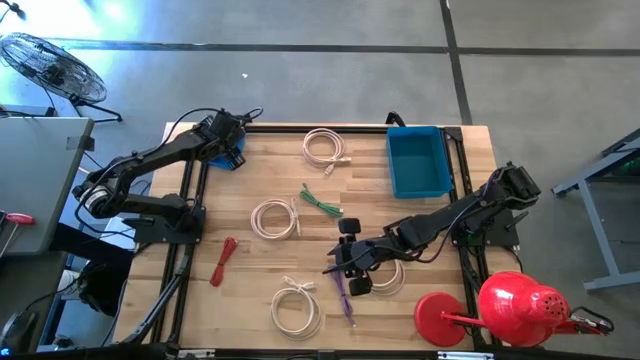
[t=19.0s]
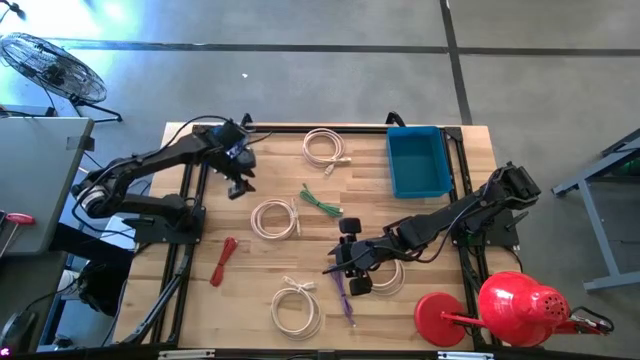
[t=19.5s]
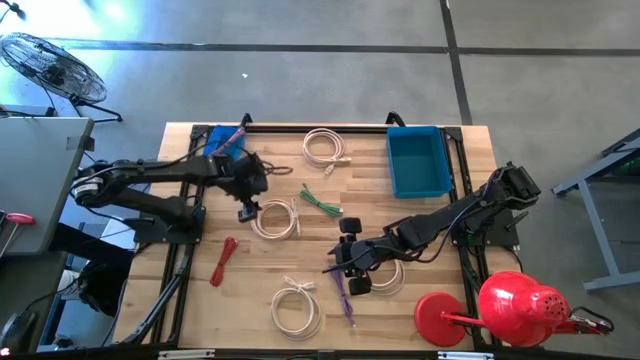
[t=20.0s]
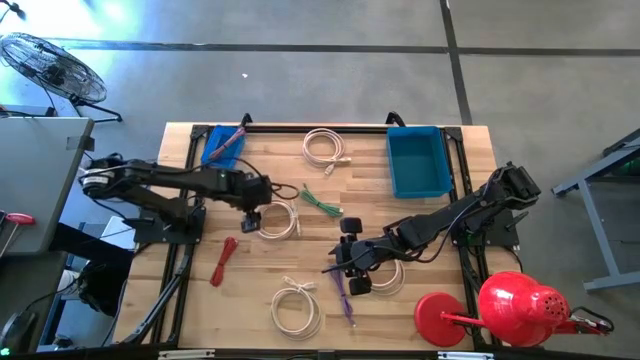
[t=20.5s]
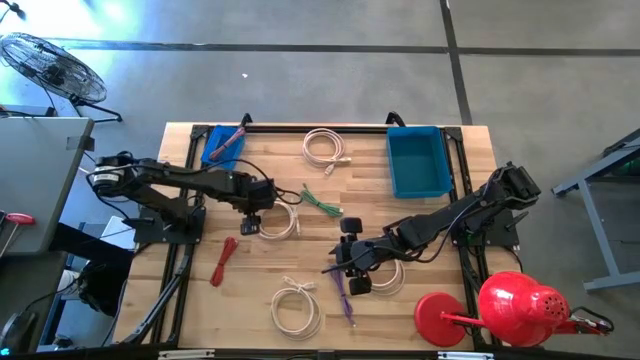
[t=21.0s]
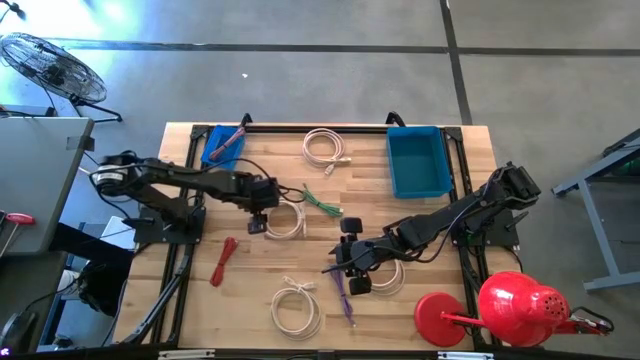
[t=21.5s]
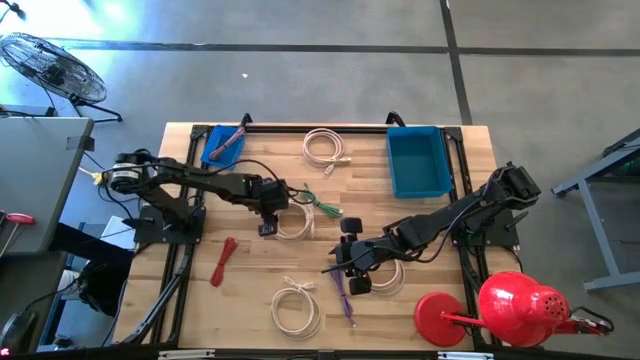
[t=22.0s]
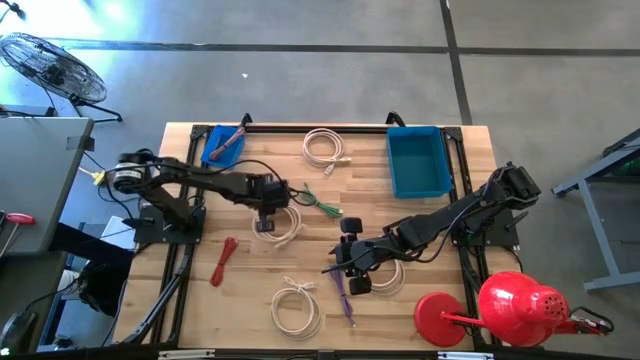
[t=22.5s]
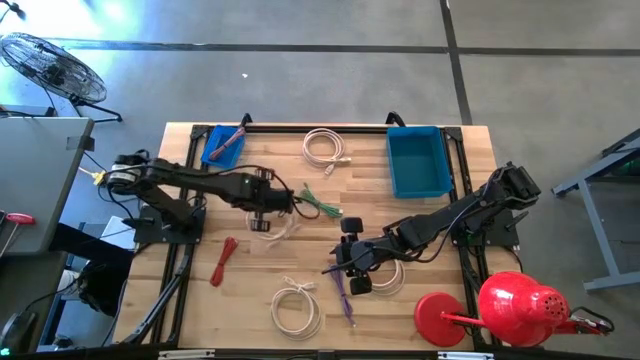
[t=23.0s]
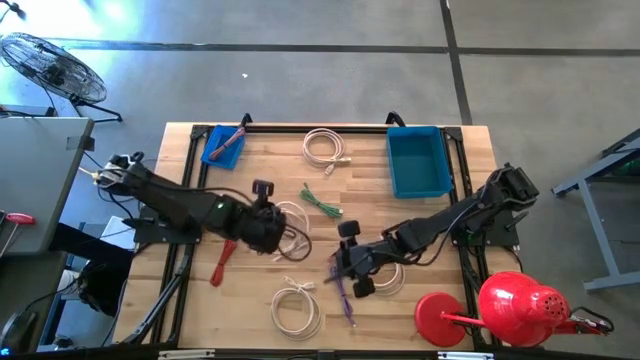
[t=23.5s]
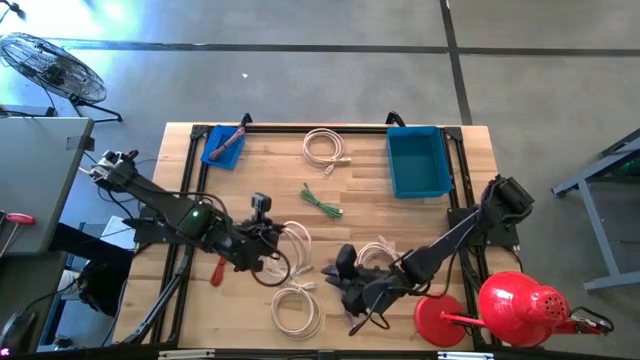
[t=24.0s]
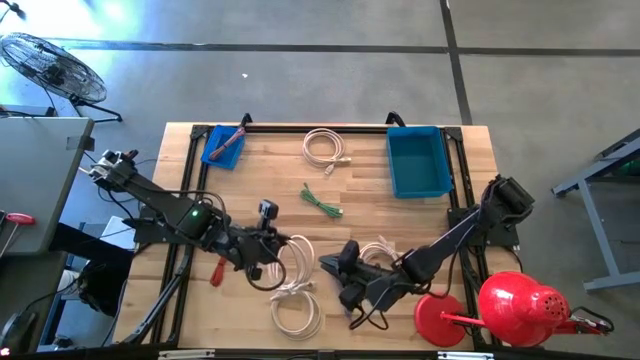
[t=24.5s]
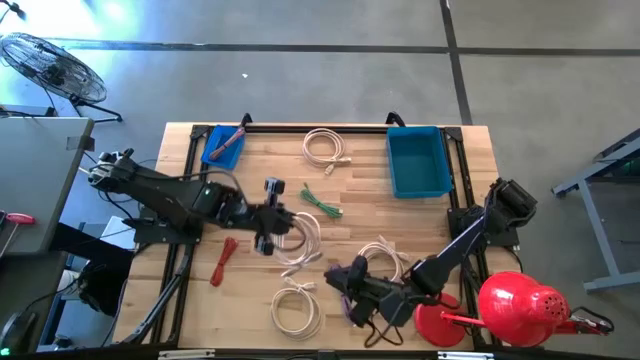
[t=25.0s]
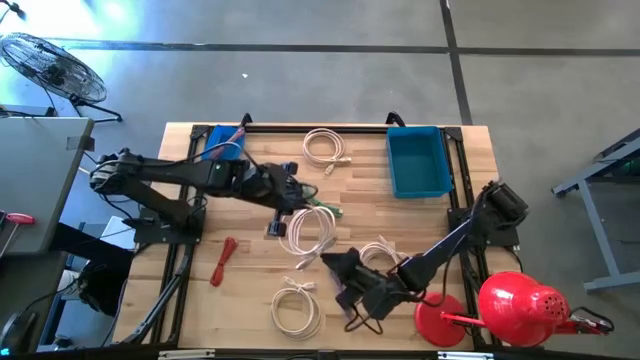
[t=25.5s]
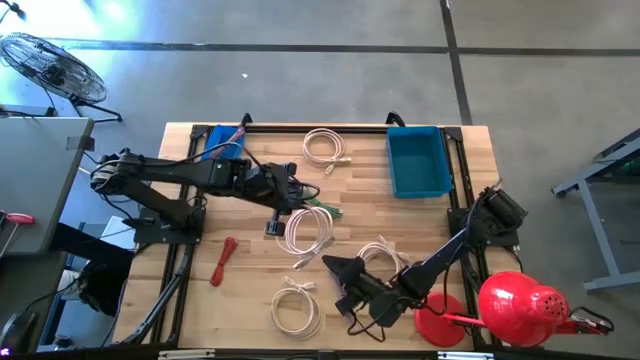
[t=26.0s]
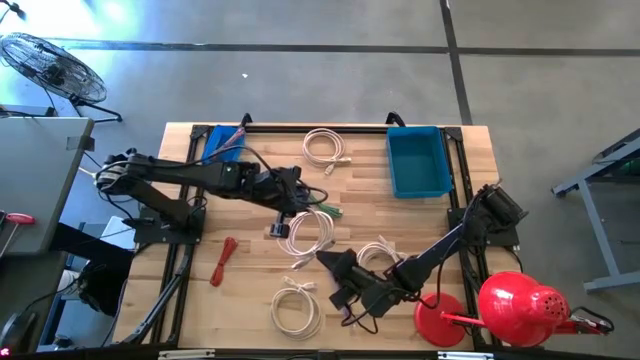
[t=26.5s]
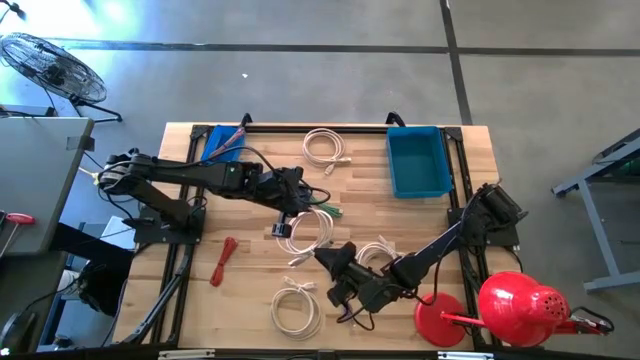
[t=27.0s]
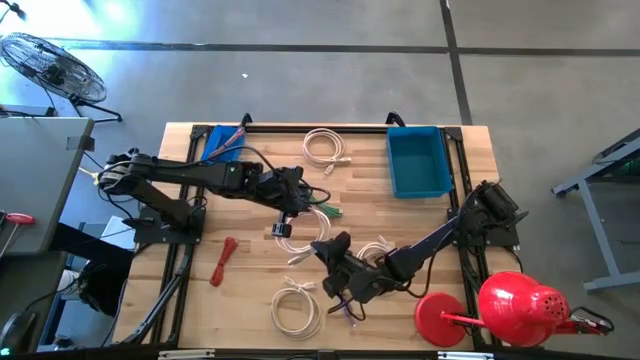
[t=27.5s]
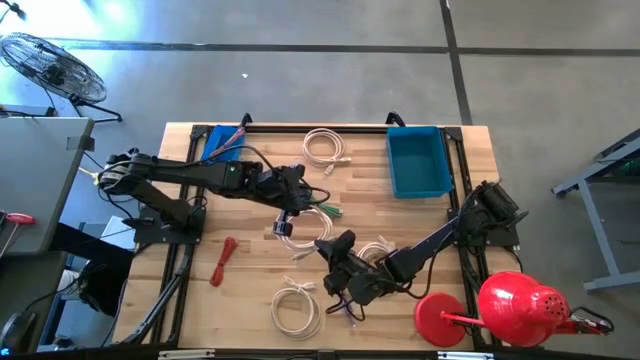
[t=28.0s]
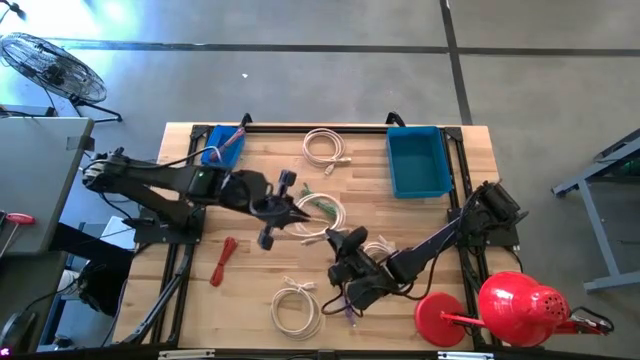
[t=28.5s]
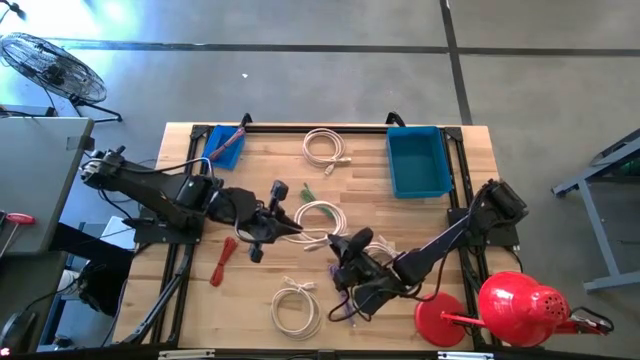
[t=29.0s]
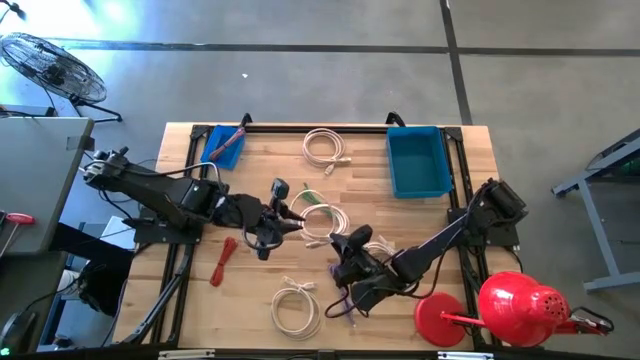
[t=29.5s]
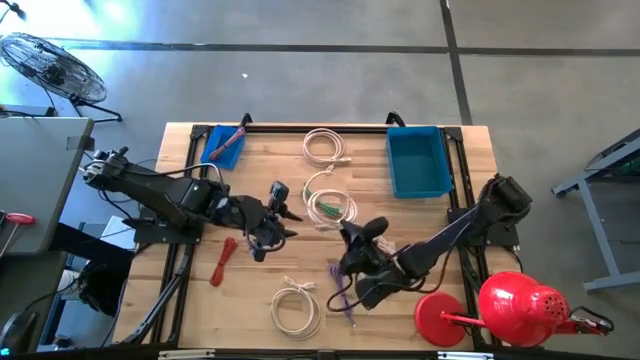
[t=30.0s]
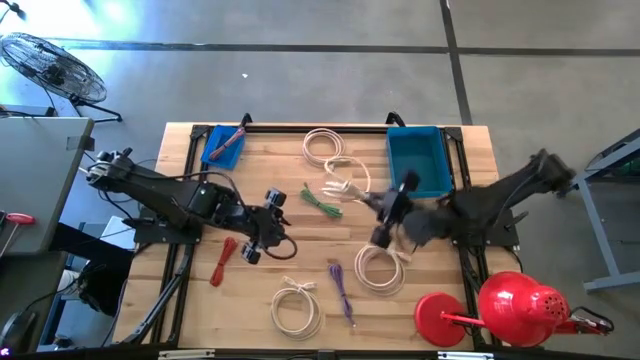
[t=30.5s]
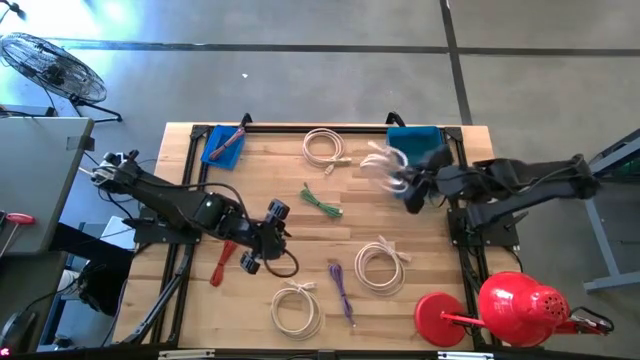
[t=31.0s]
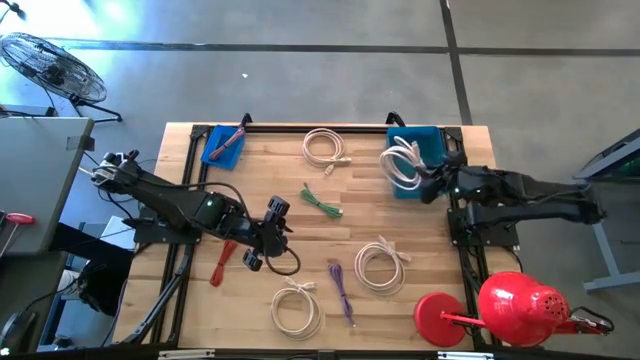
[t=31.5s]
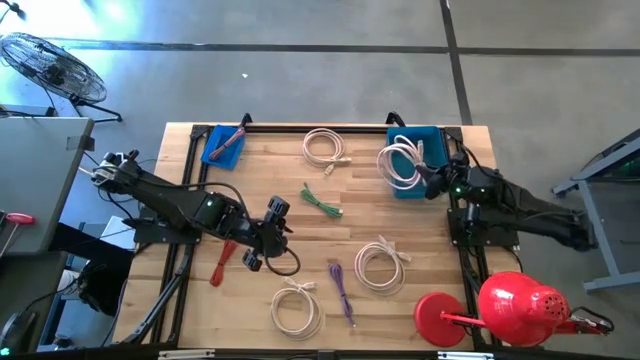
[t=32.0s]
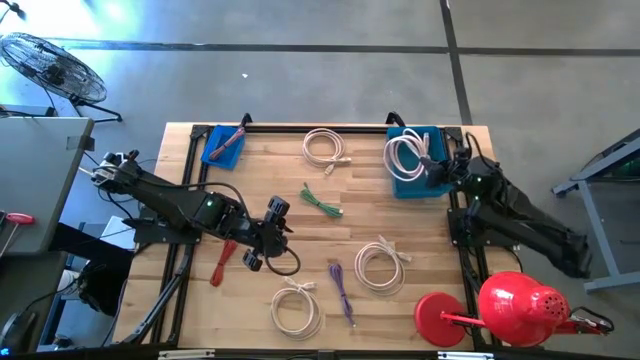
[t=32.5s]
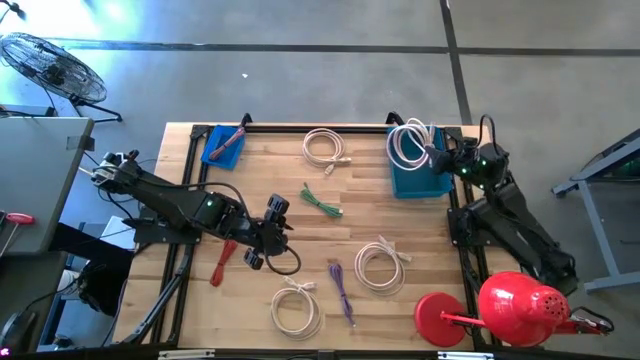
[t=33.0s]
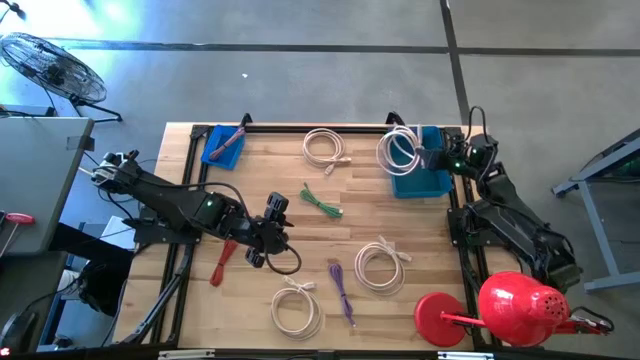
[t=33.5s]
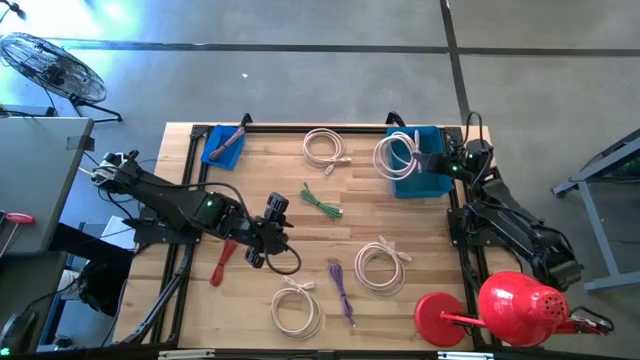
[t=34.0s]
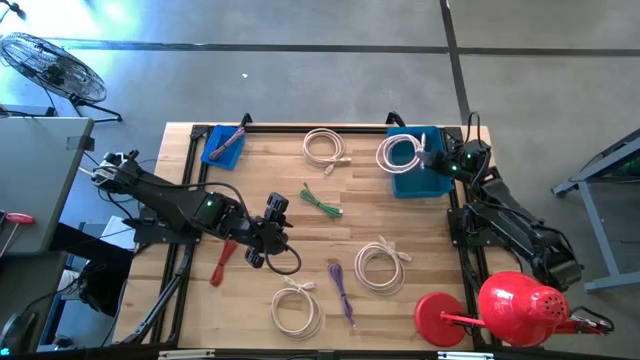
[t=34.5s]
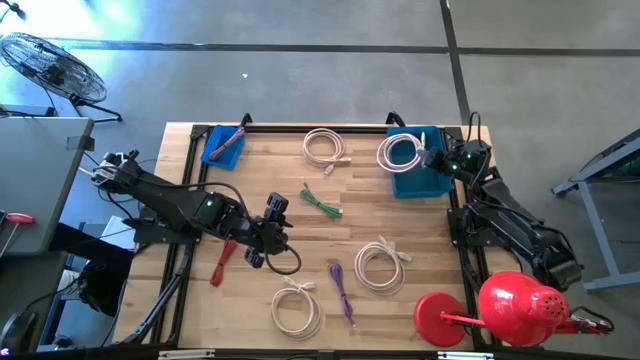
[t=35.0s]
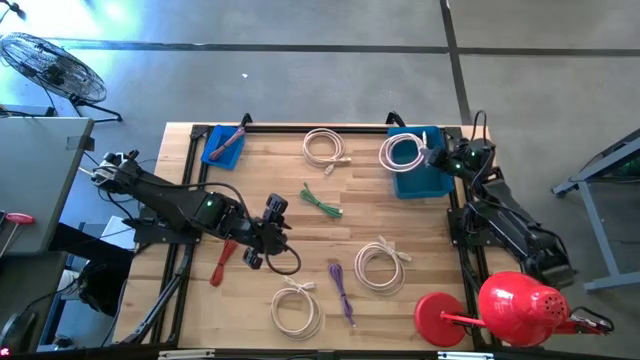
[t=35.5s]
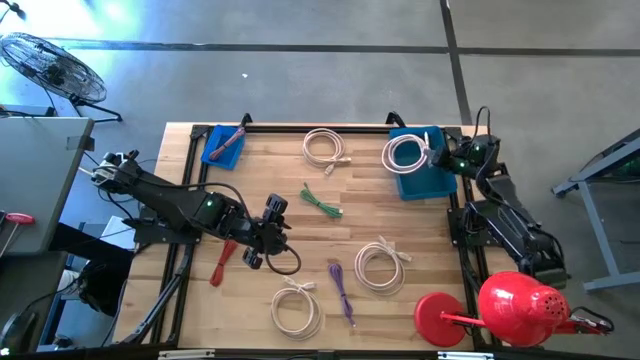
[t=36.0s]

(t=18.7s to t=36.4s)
Task: Pick & Place USB Port
Put the brown HDMI cable into the right blue bin

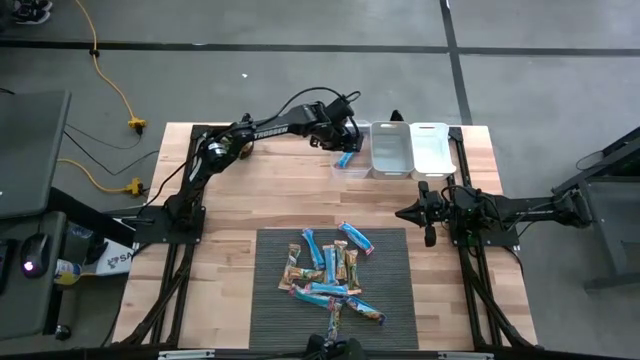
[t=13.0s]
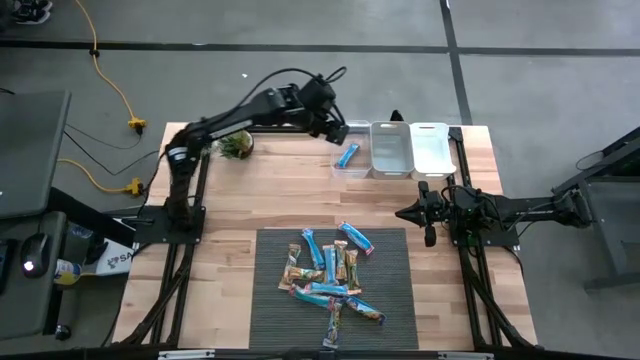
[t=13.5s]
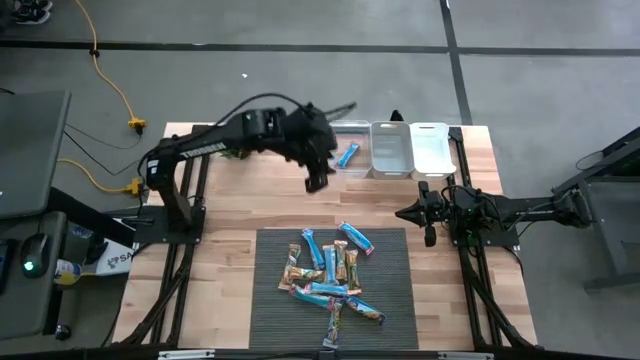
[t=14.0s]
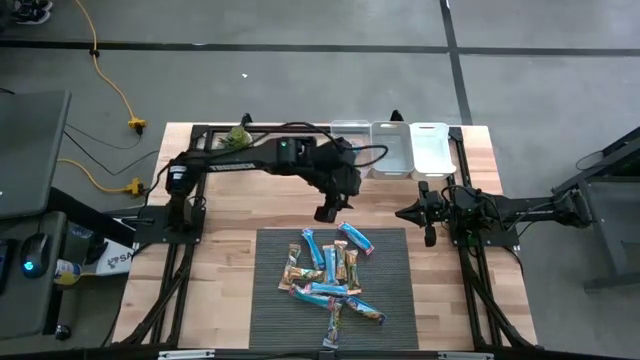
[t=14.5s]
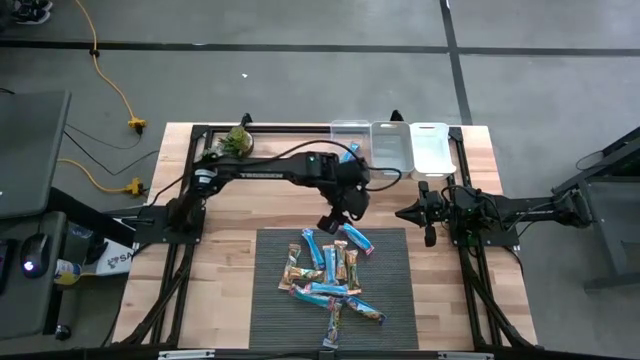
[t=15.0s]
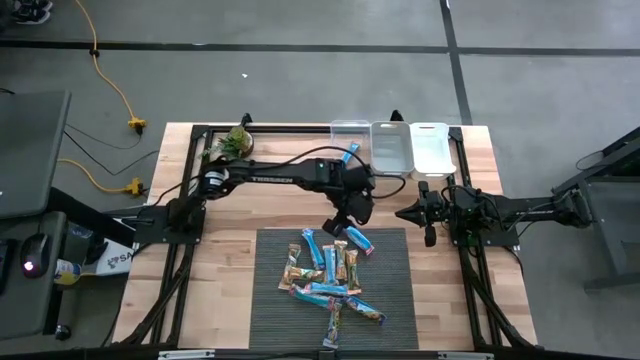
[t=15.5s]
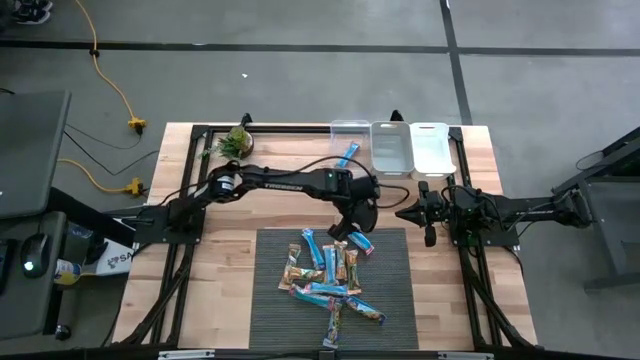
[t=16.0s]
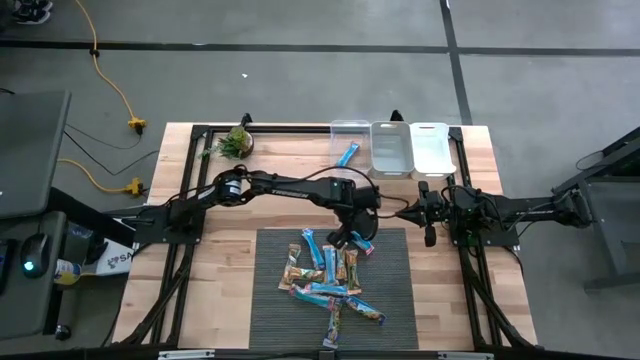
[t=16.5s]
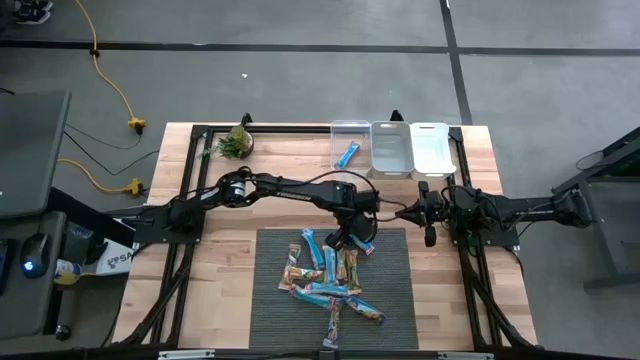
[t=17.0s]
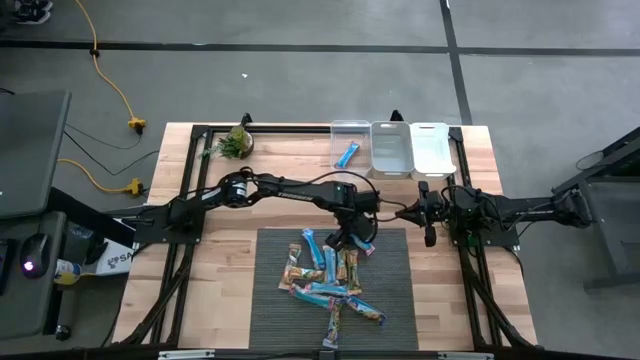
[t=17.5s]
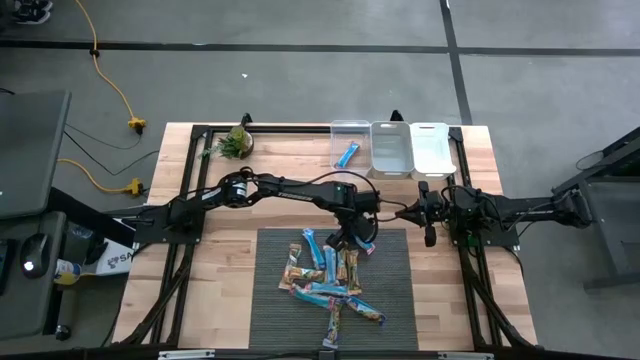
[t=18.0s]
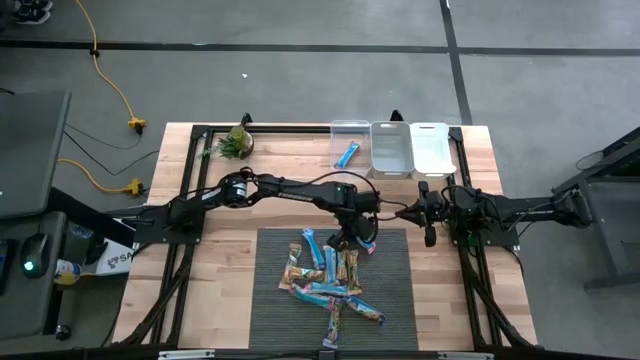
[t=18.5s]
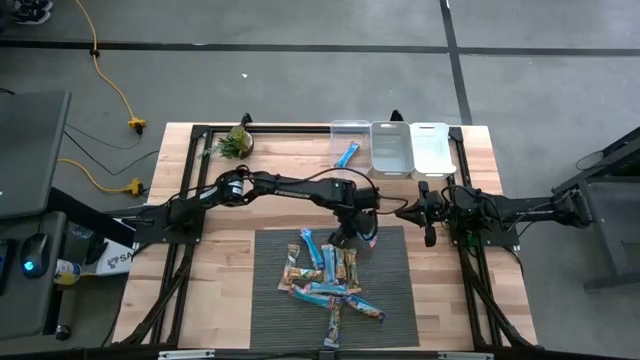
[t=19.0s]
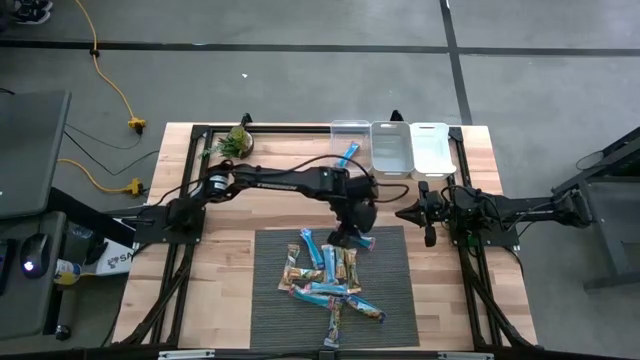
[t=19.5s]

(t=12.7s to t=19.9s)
Task: Pick and place Granola Bars by type
Put the red granola bar into the transparent bin
